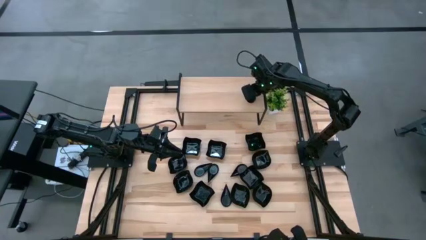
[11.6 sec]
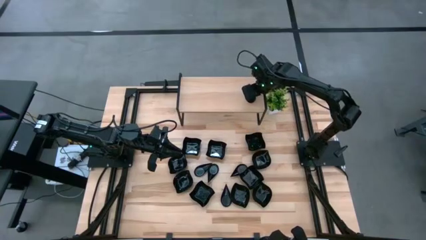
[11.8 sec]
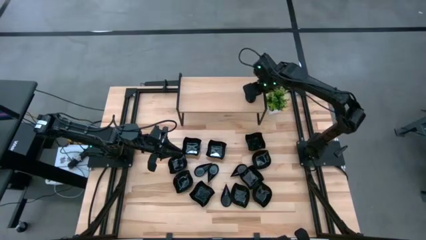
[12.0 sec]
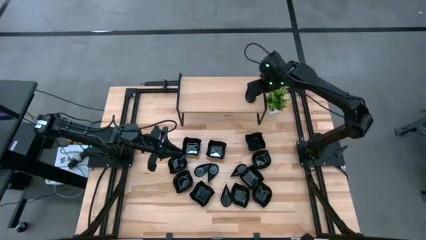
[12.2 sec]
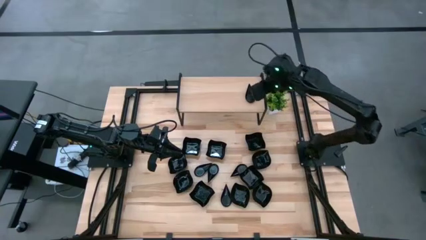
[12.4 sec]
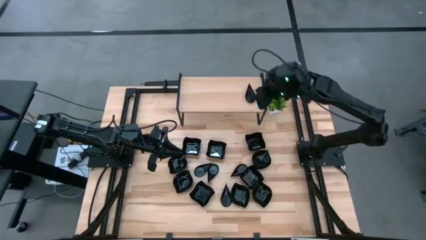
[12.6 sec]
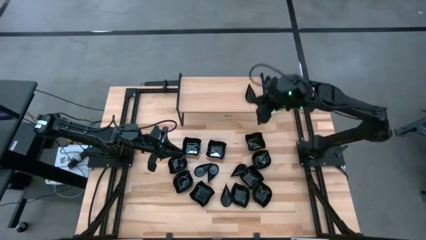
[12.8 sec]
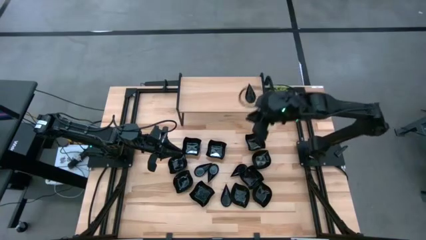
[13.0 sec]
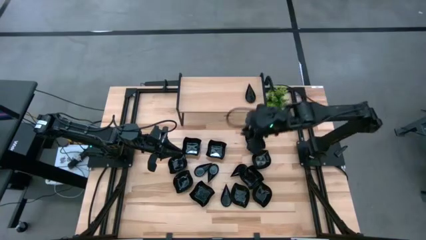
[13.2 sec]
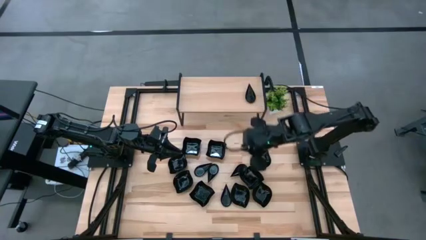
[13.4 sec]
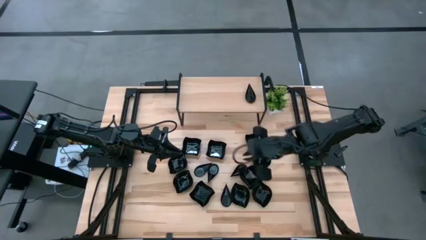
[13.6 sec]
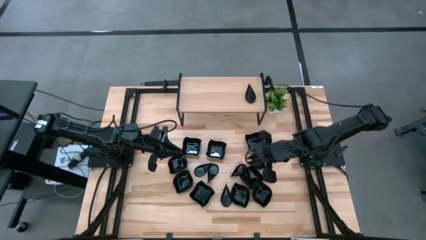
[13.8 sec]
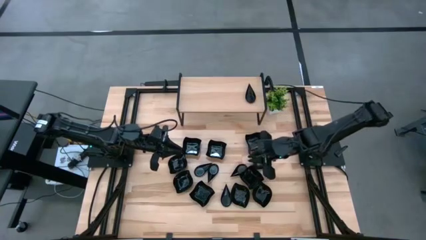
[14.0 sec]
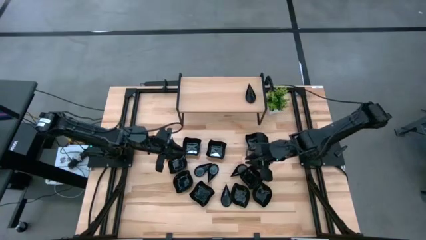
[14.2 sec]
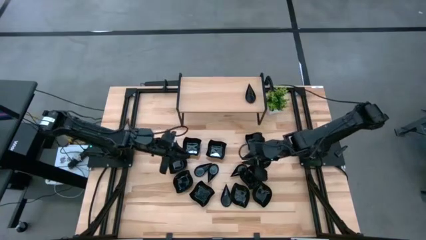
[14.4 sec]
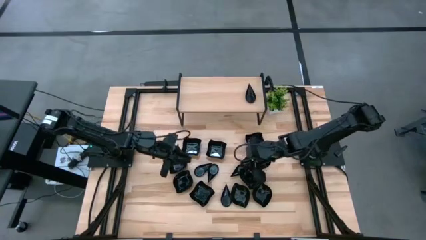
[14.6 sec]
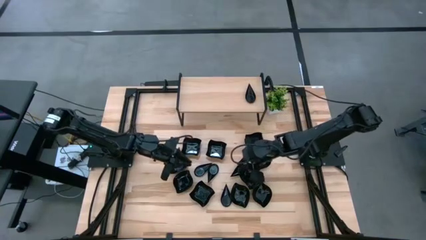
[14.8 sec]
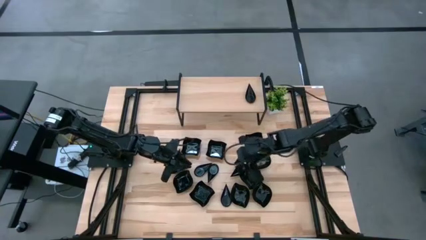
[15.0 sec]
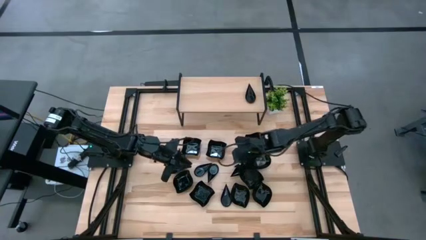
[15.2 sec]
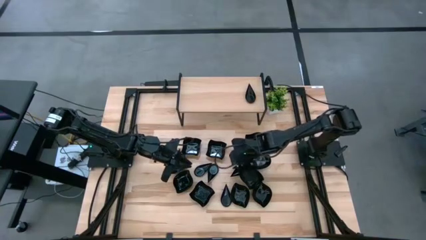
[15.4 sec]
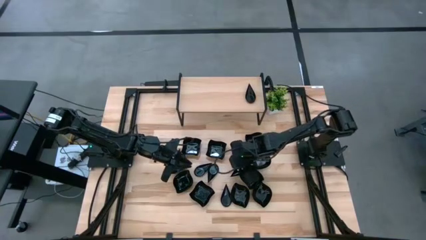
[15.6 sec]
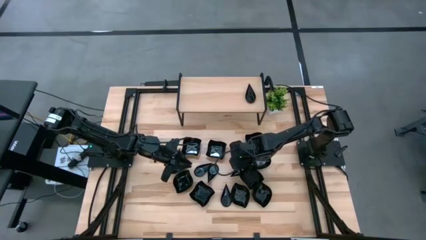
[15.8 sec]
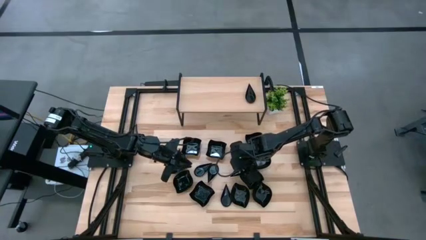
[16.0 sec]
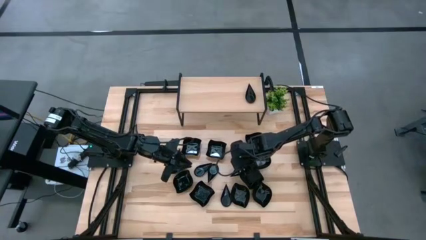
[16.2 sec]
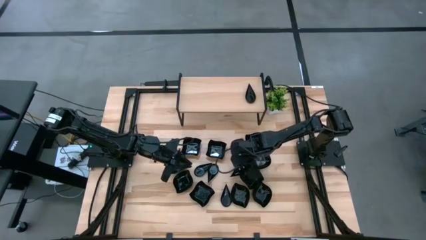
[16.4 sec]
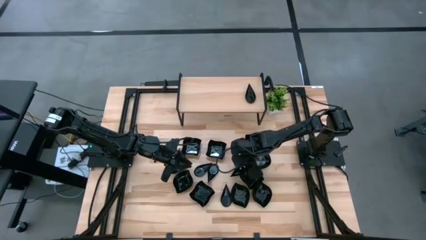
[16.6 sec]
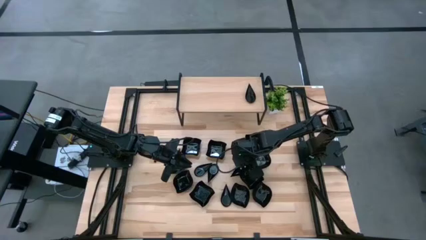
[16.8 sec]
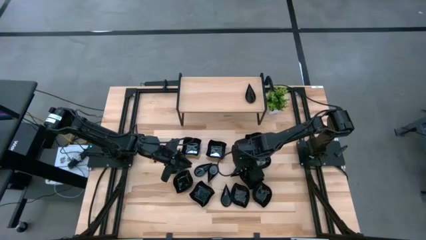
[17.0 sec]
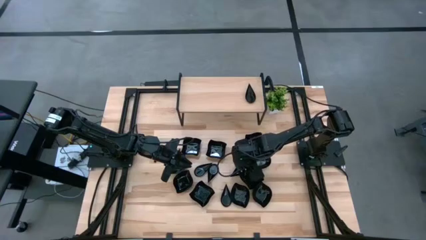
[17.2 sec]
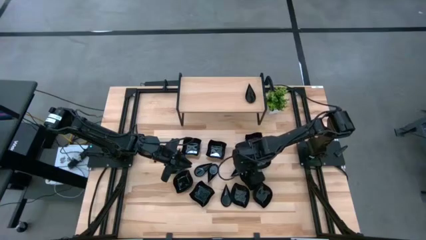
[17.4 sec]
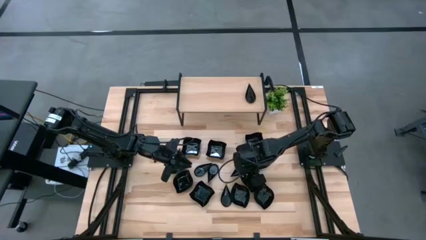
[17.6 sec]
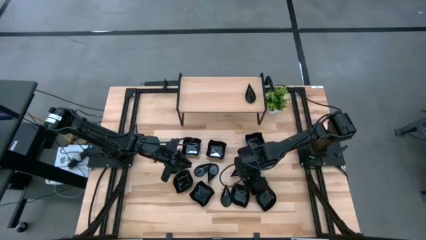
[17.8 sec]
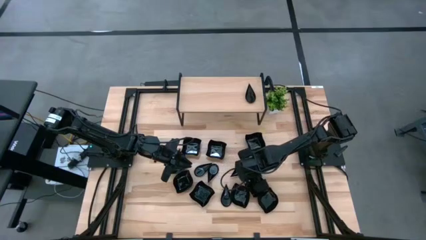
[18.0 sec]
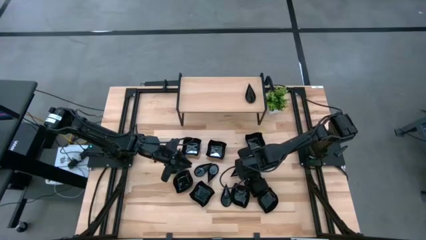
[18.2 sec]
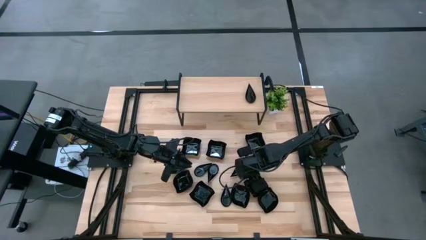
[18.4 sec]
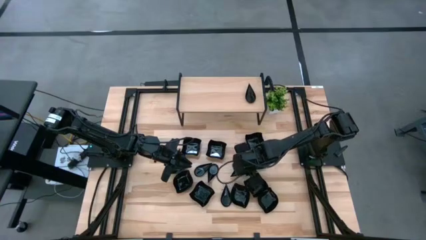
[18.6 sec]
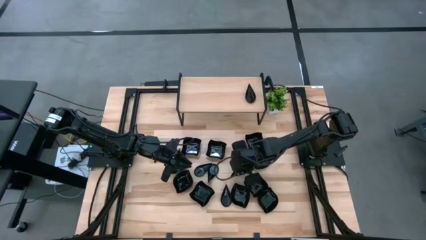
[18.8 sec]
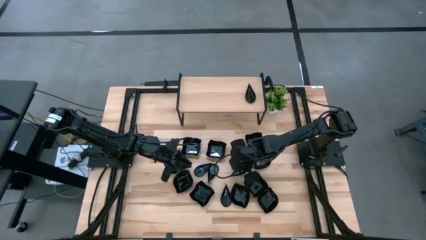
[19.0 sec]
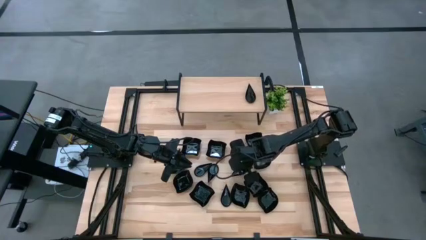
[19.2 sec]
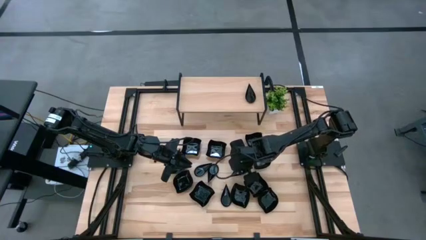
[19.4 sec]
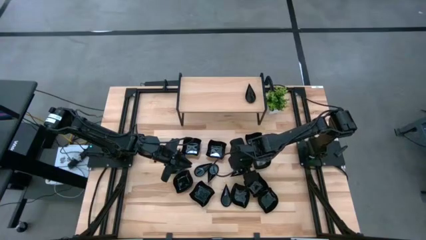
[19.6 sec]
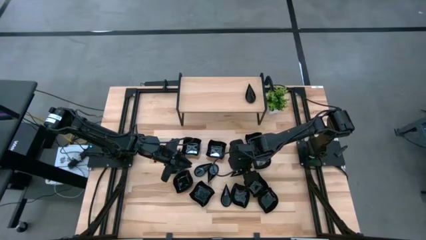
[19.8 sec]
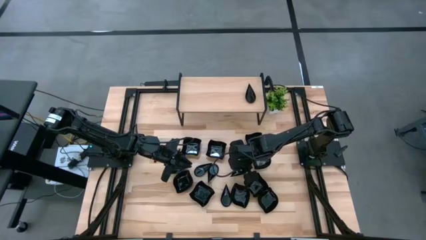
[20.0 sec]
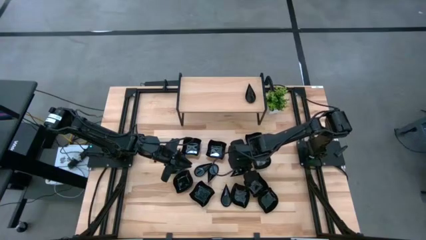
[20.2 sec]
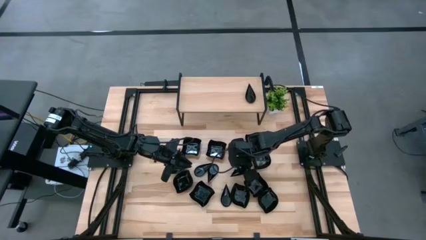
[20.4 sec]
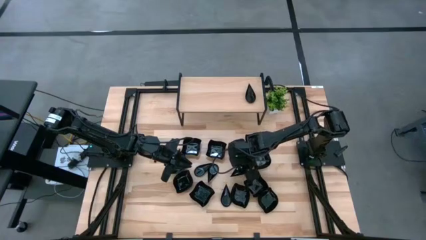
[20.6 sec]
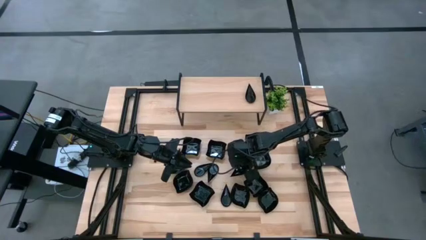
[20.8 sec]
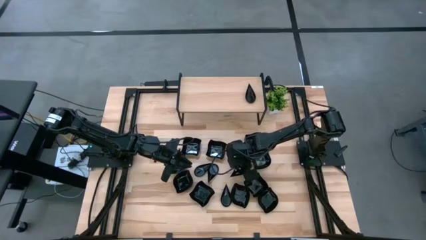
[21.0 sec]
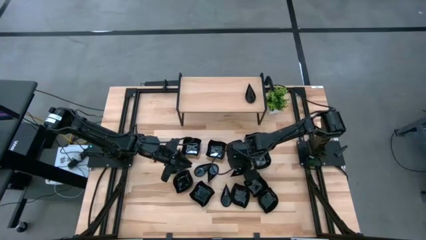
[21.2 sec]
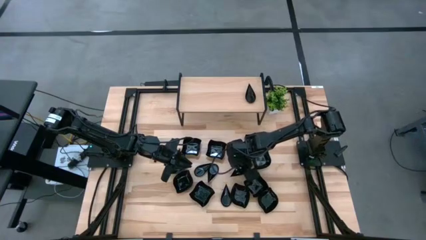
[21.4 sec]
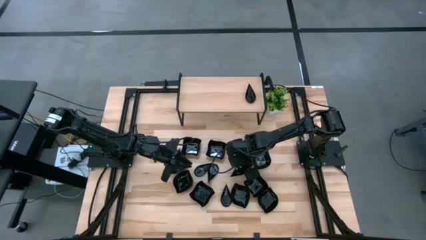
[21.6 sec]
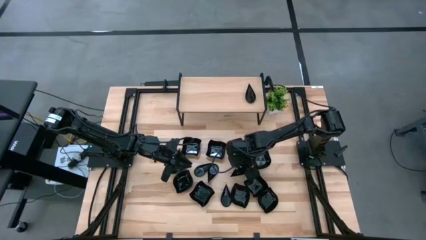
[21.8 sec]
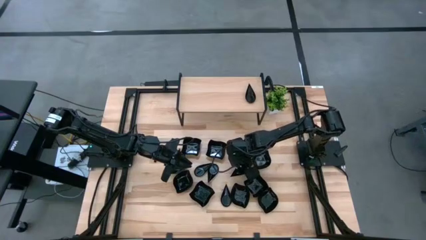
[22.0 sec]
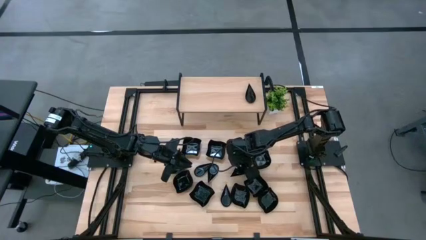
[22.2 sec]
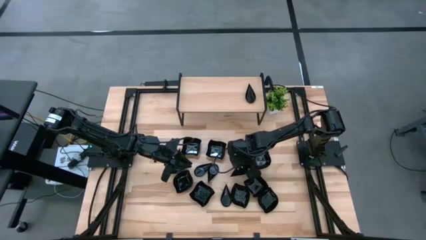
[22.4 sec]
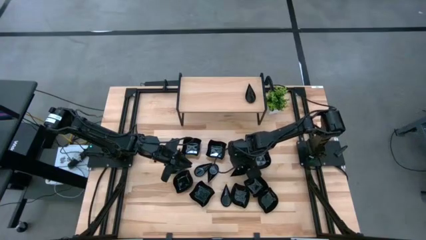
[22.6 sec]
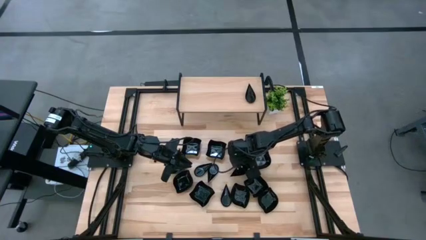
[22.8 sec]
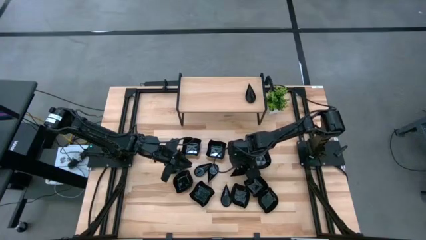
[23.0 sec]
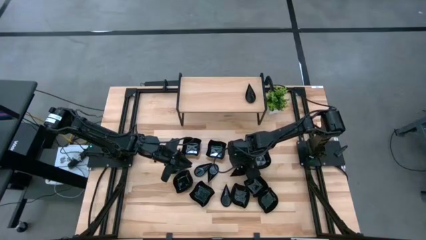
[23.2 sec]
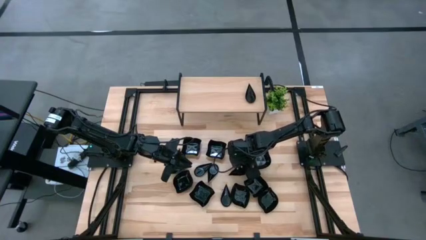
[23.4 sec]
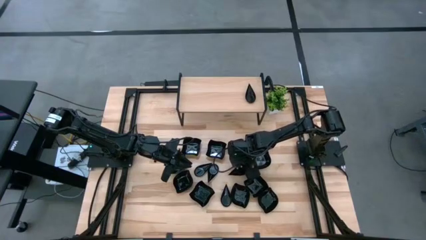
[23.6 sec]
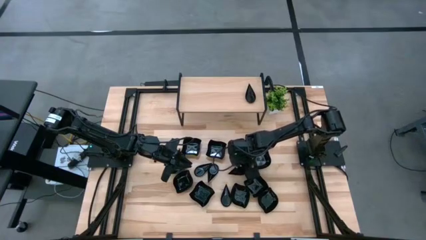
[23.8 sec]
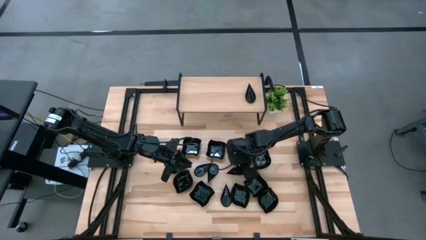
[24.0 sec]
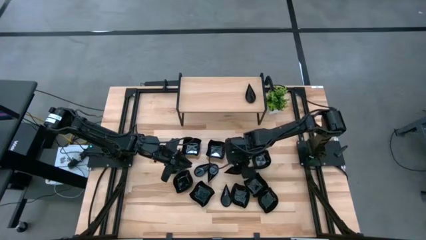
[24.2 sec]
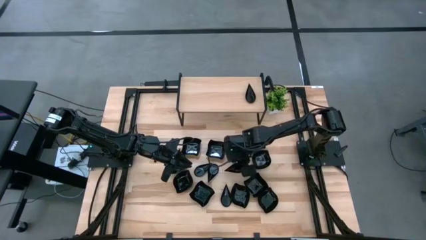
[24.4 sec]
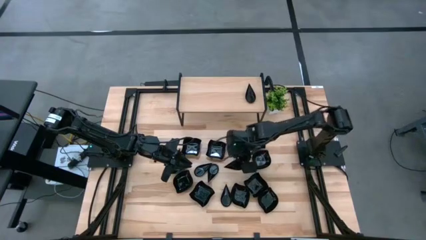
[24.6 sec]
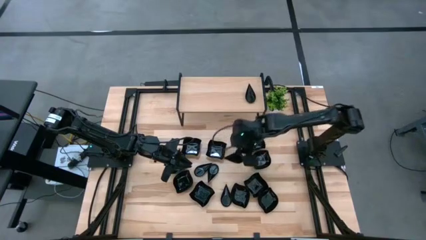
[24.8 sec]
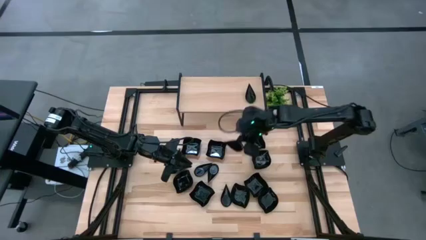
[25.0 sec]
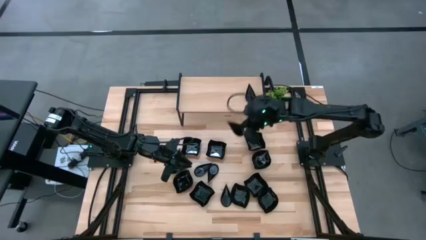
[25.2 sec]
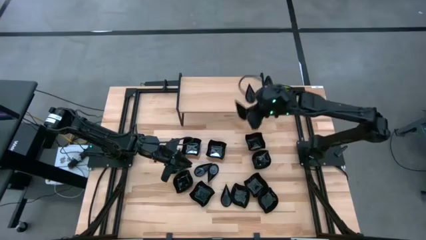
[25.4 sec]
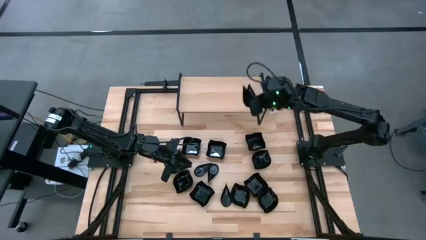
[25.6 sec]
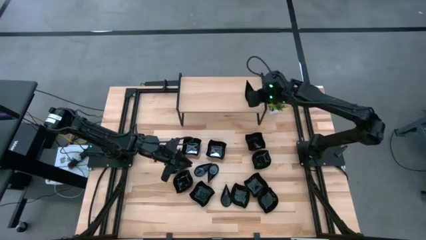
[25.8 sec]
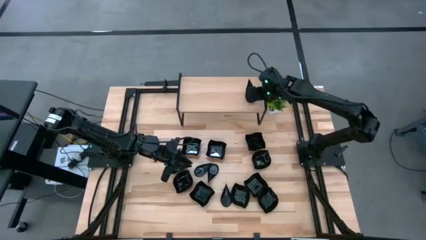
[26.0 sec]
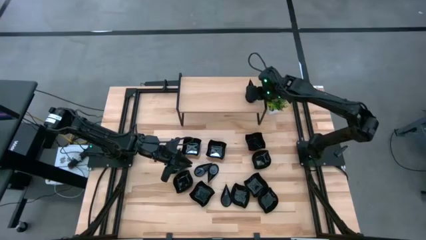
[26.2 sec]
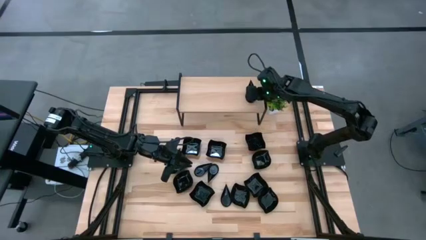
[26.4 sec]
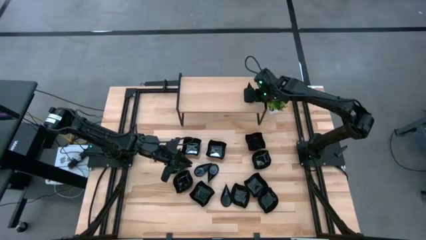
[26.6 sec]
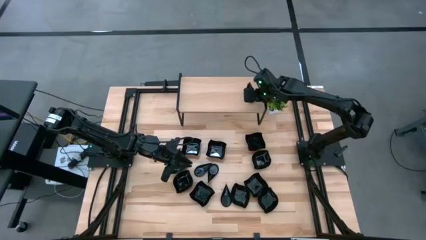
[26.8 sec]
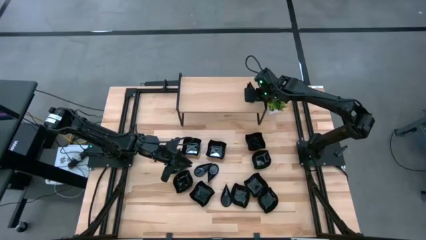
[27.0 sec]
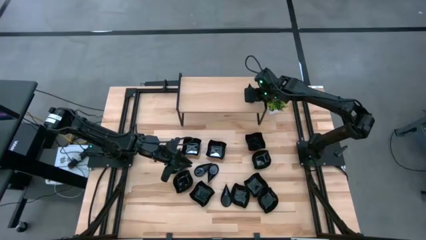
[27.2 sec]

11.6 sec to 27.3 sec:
Task: Pick & Place Mini shaped plates
Stack the black drop shaped plate on top of the black drop shaped plate on the shelf
